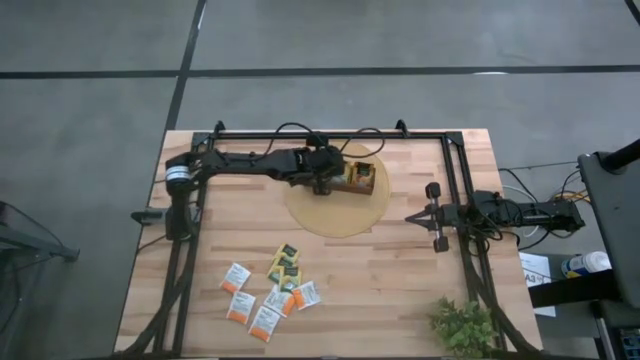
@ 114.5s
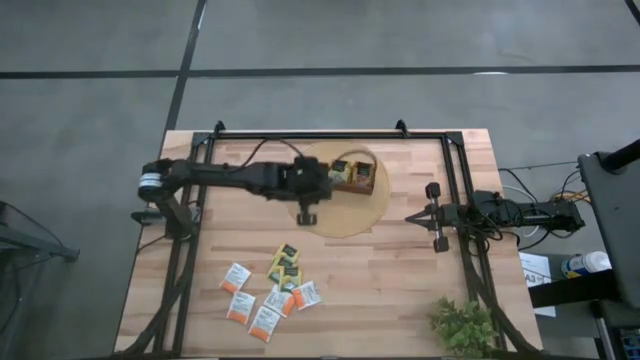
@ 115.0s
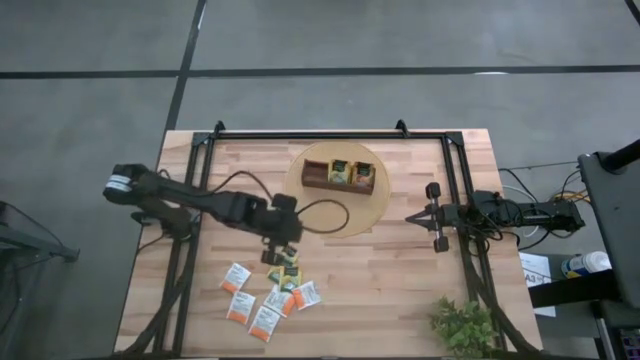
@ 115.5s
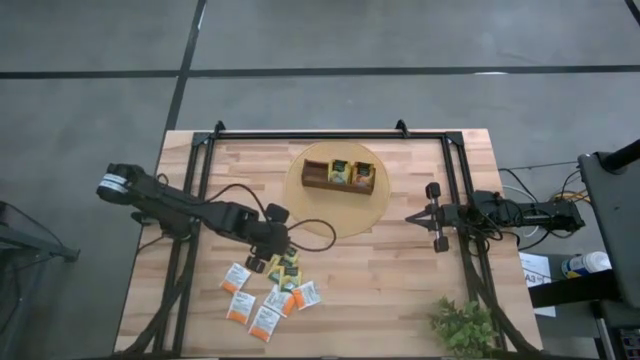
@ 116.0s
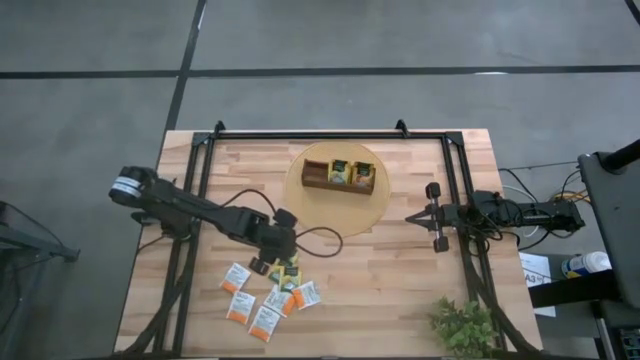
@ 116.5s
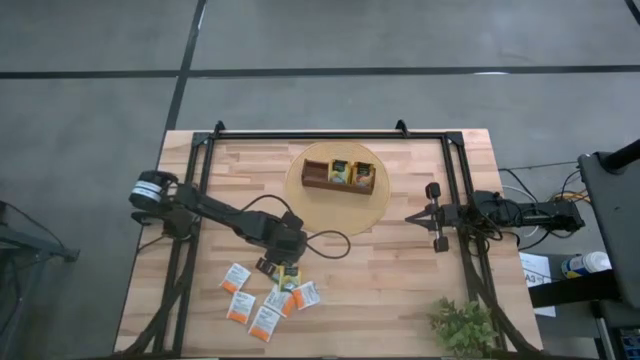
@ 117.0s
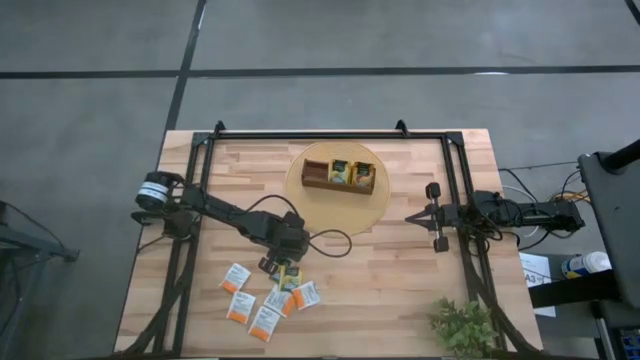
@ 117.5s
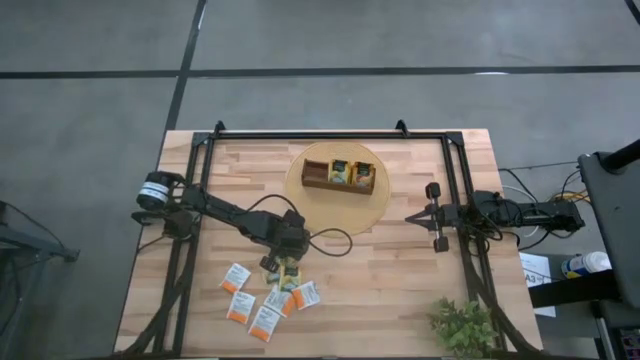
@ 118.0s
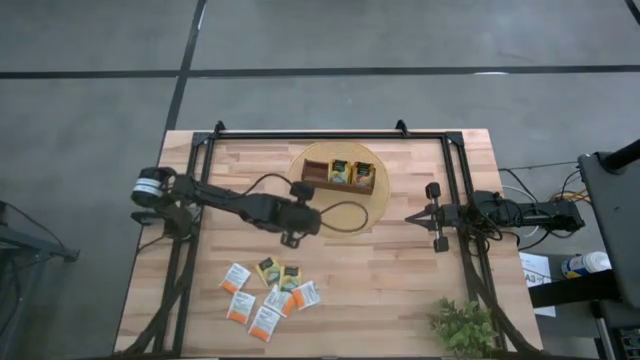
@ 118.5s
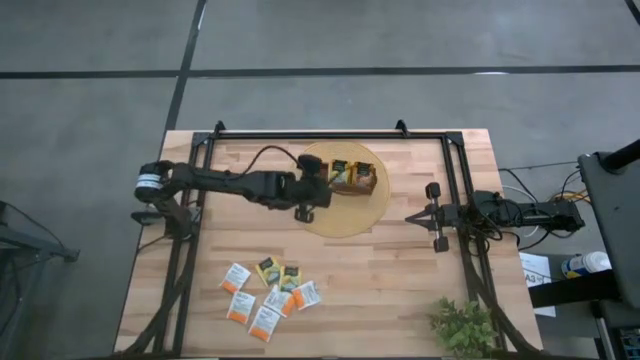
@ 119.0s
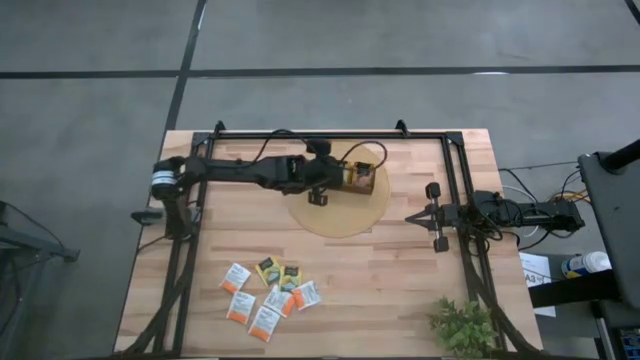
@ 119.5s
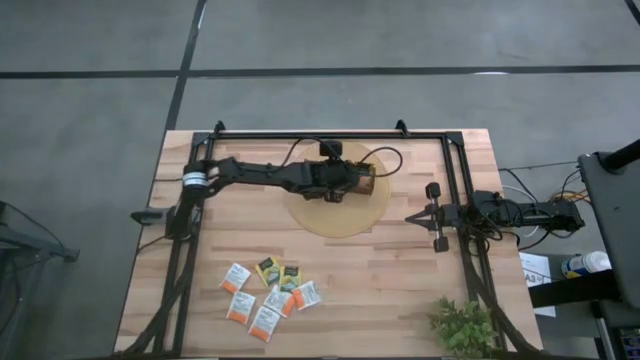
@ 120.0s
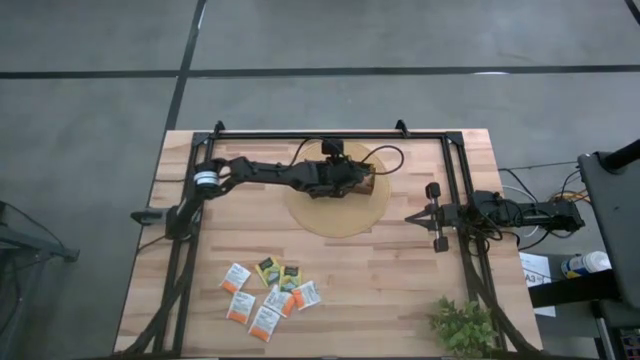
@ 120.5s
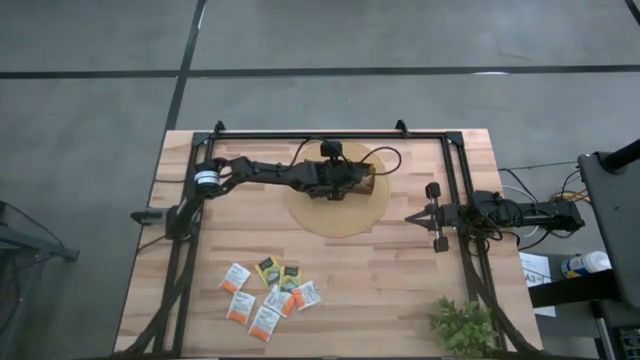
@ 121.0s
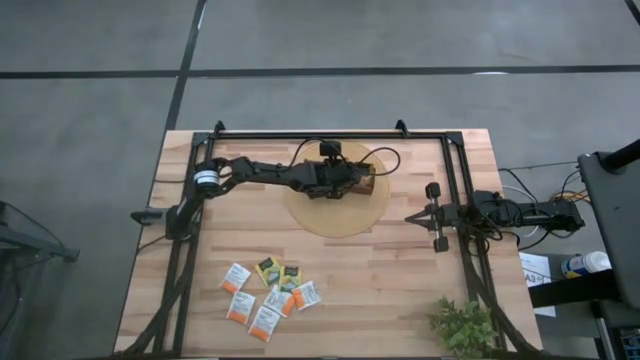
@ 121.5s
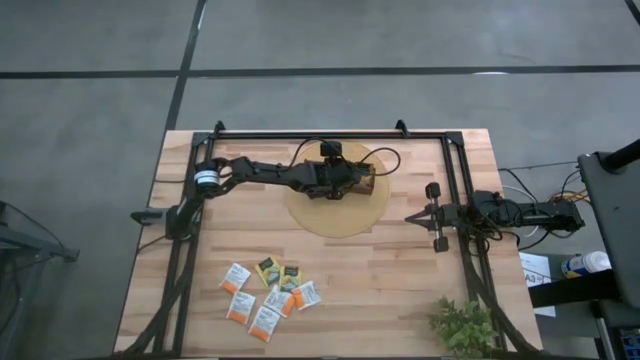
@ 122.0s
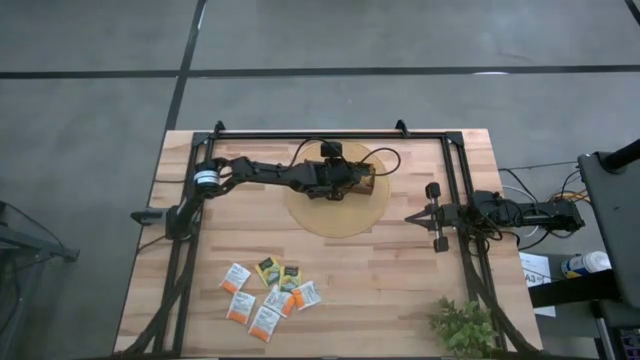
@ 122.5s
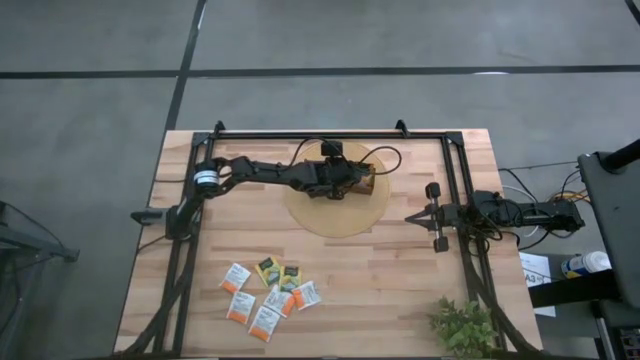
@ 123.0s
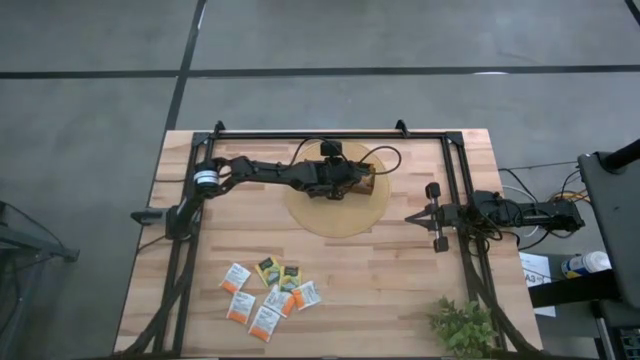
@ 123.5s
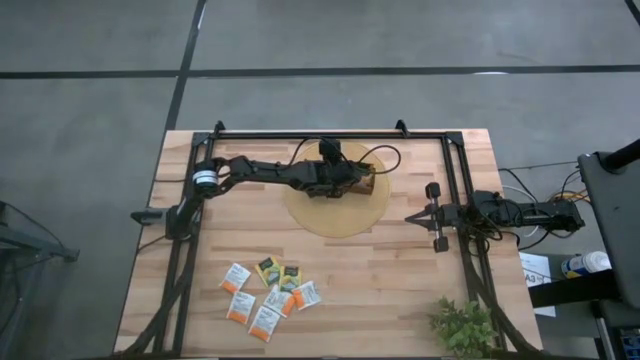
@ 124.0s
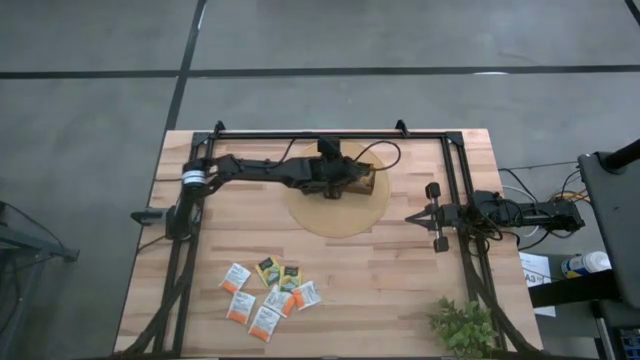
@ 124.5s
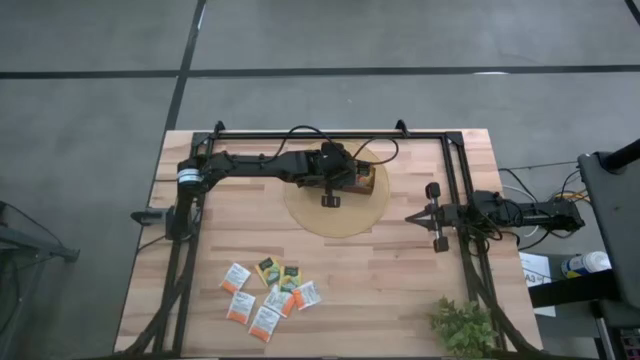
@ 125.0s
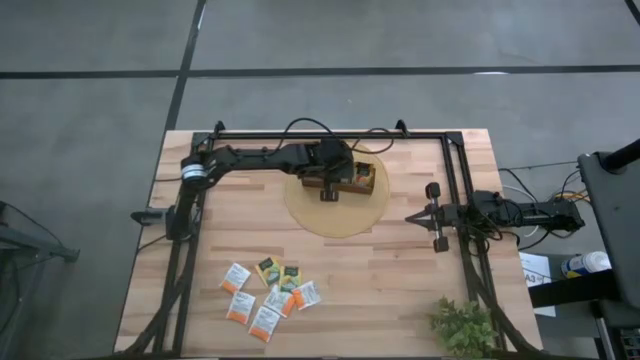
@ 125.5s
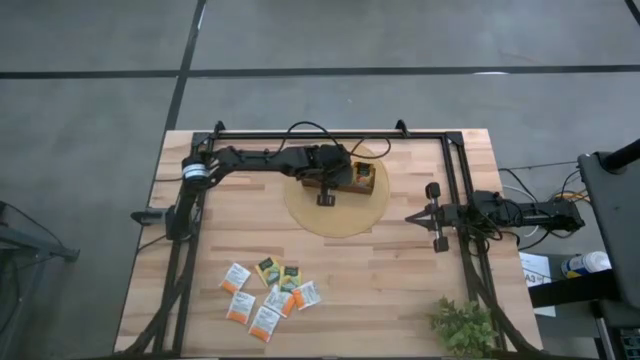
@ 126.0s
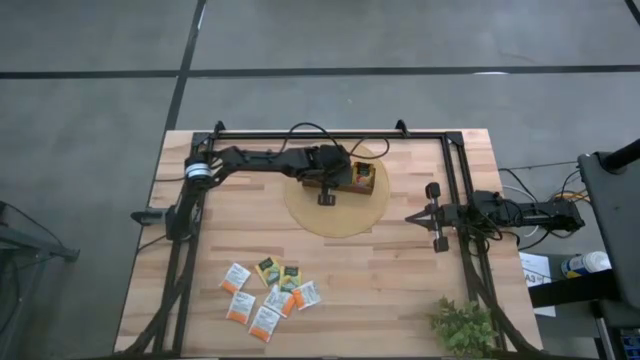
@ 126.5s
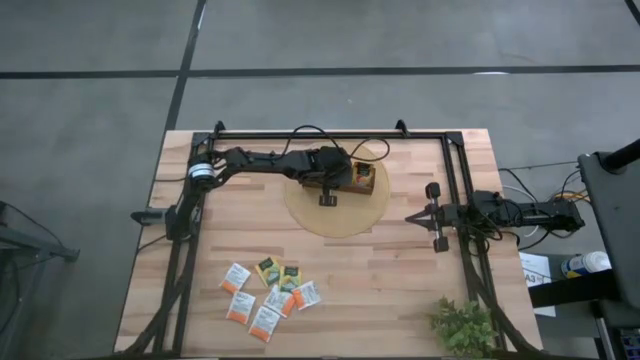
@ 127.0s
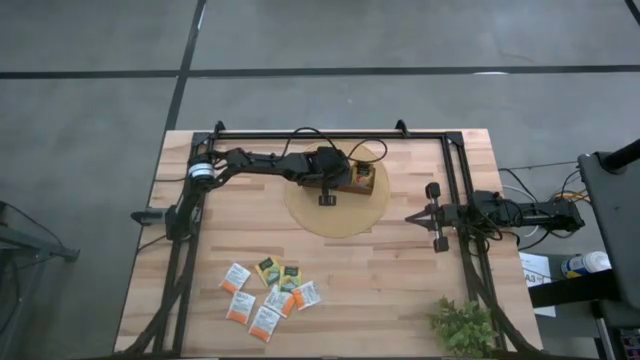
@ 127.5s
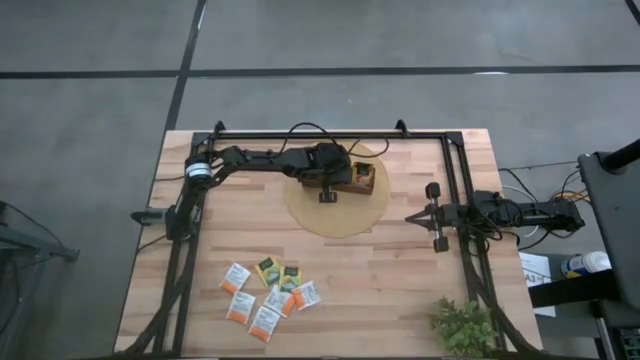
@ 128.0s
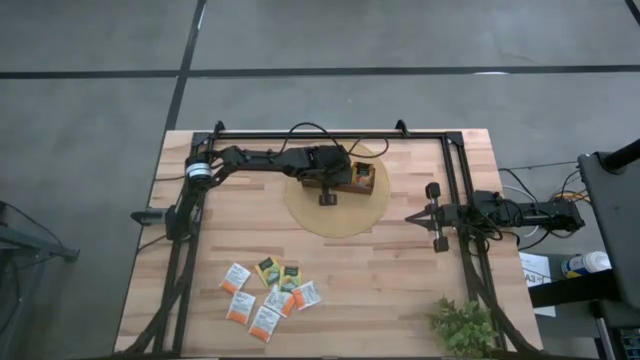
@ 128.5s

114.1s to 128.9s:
Task: Pick & Place Tea
Put the top green tea bag into the middle section of wooden organizer

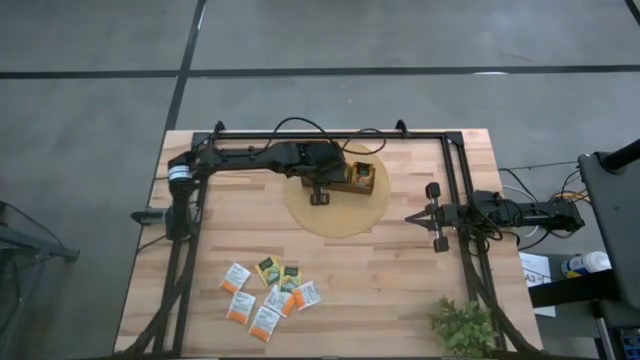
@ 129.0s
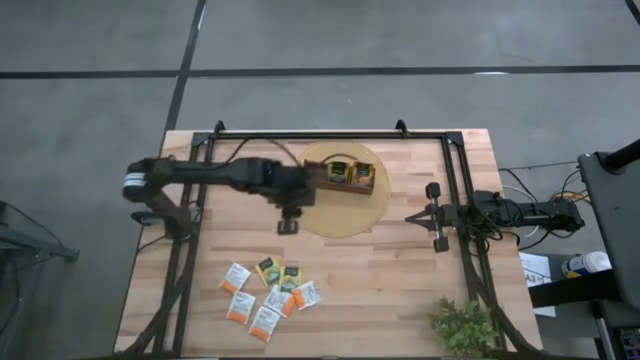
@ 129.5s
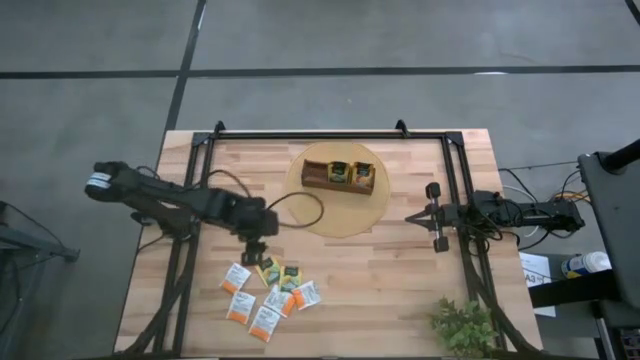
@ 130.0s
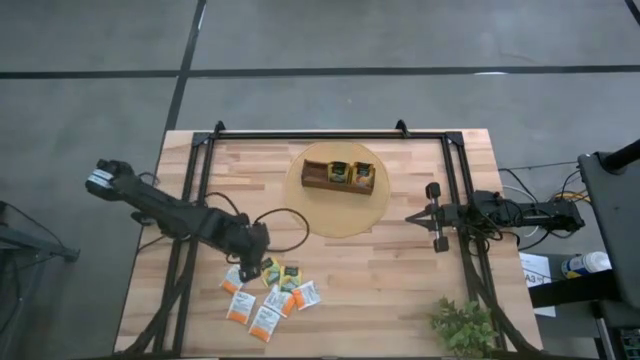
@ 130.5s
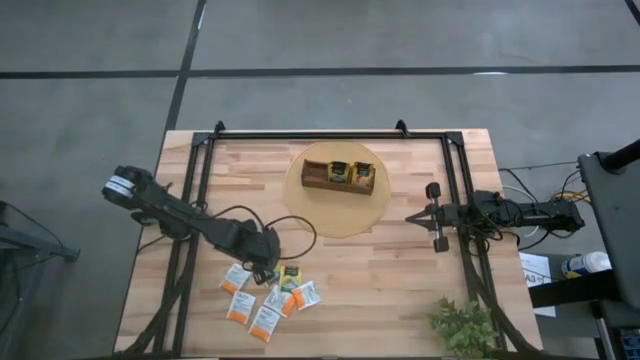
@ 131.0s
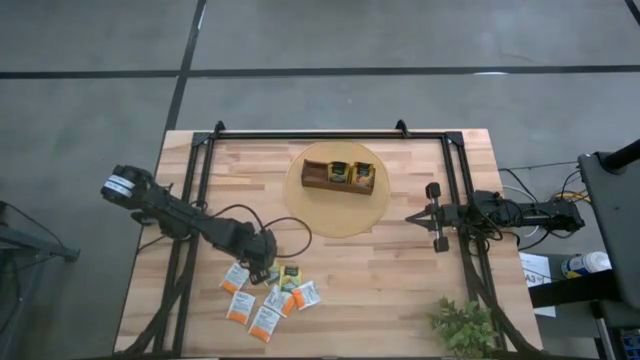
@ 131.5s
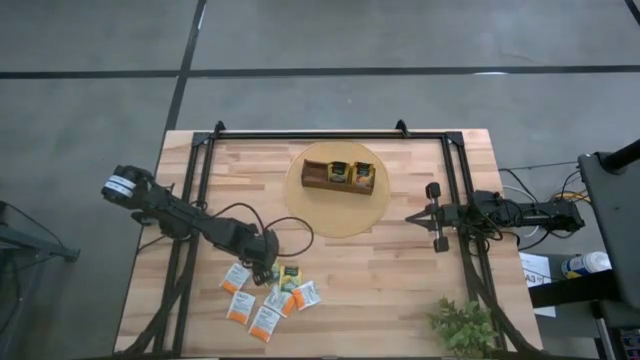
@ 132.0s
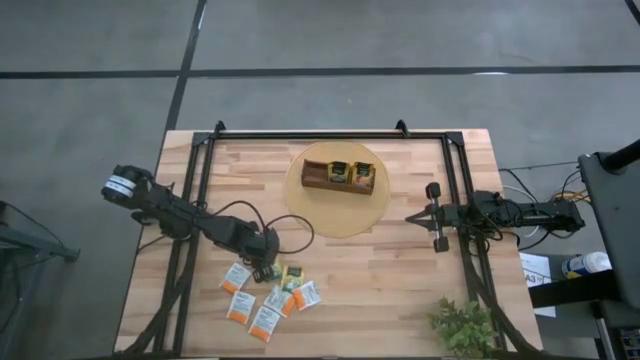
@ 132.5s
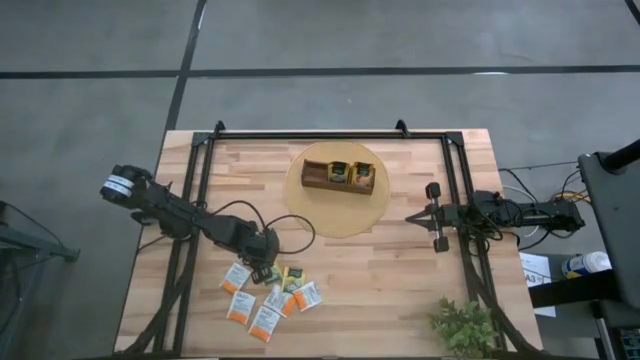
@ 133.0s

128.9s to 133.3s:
Put the left green tea bag into the middle section of wooden organizer

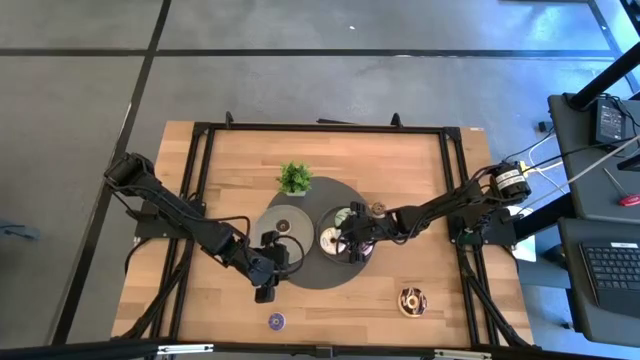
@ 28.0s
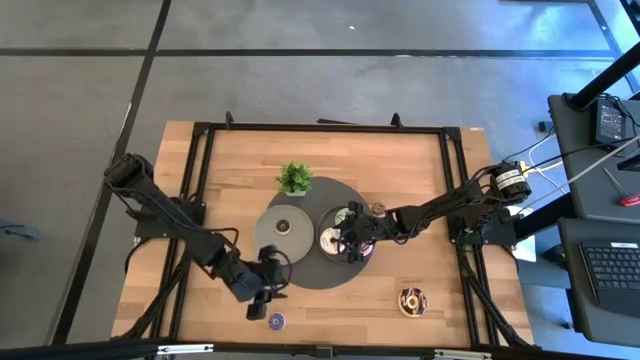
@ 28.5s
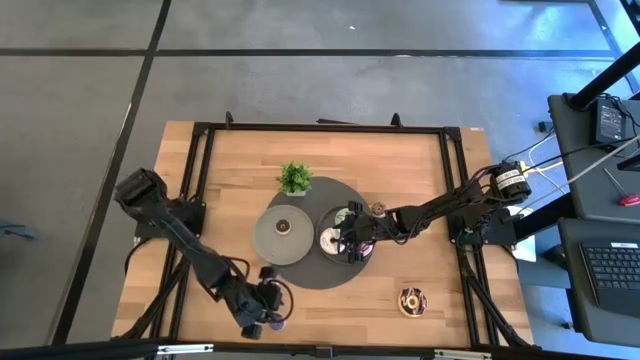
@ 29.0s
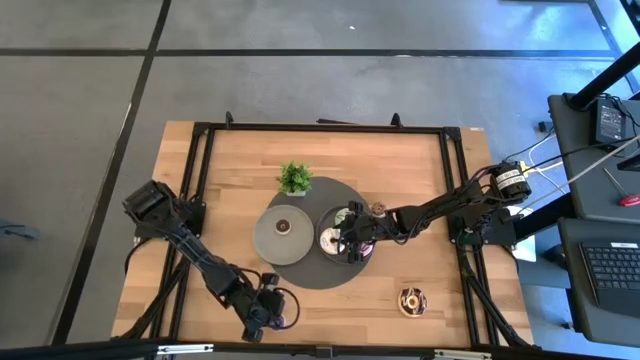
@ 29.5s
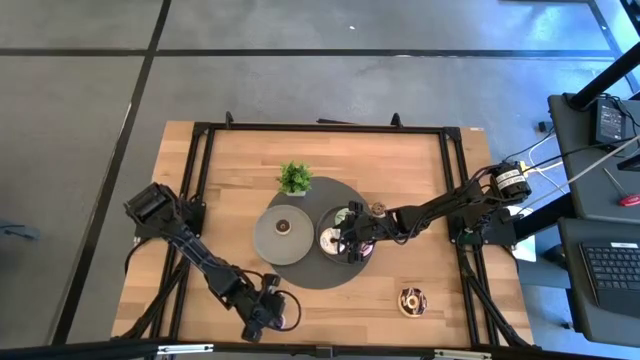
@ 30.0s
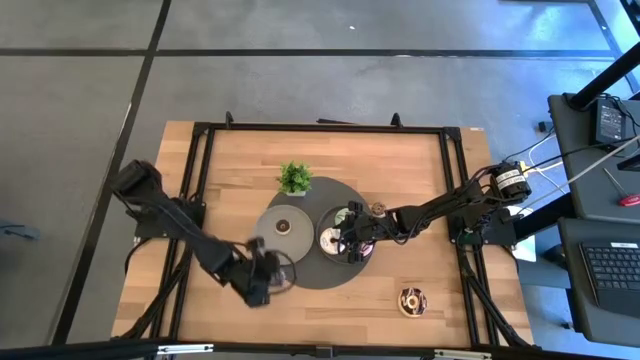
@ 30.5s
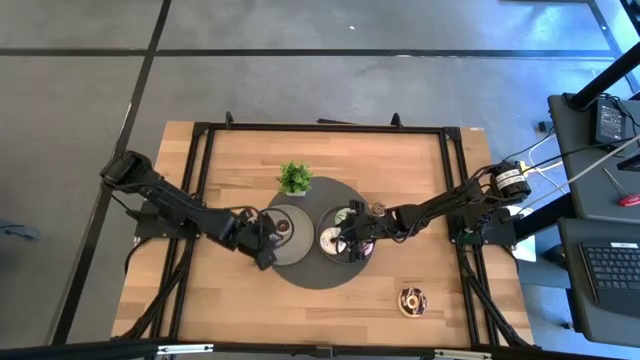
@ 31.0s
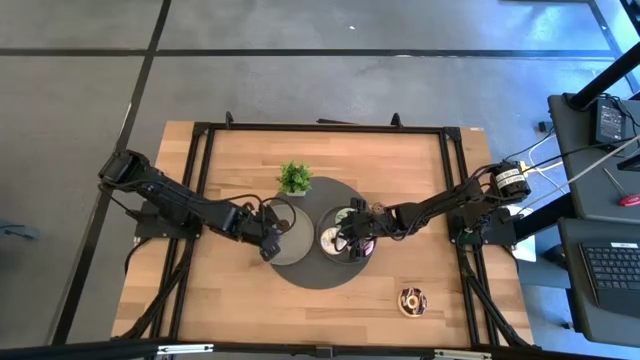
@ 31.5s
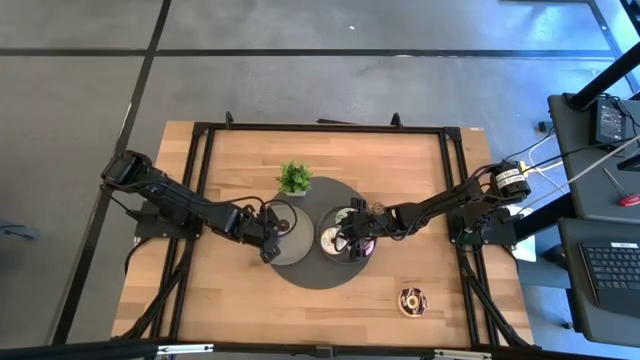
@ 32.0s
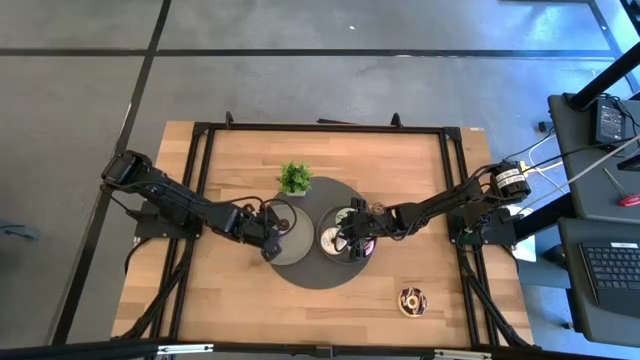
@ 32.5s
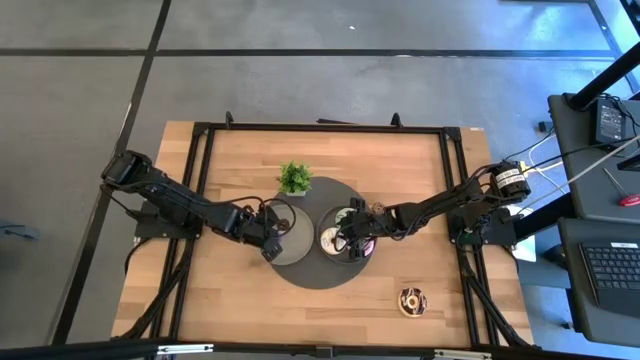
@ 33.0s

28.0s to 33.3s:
Task: Pick & Place donuts
Put the small purple donut on the gray plate
